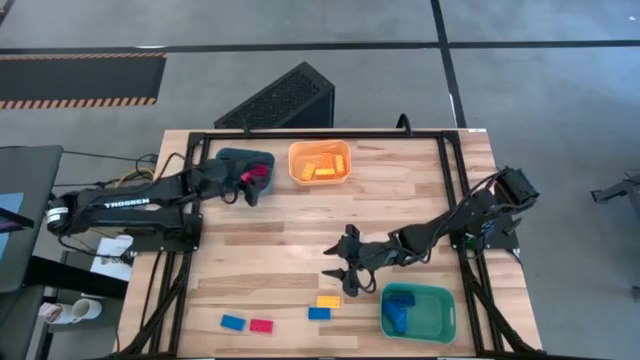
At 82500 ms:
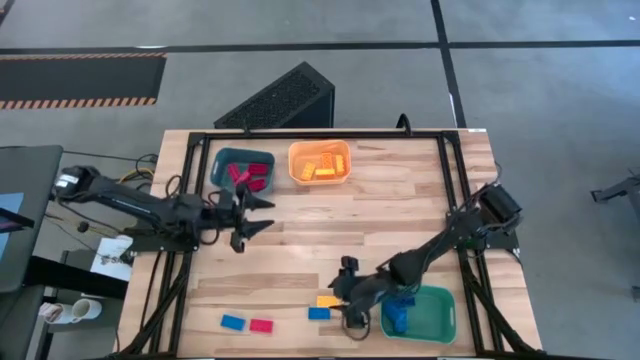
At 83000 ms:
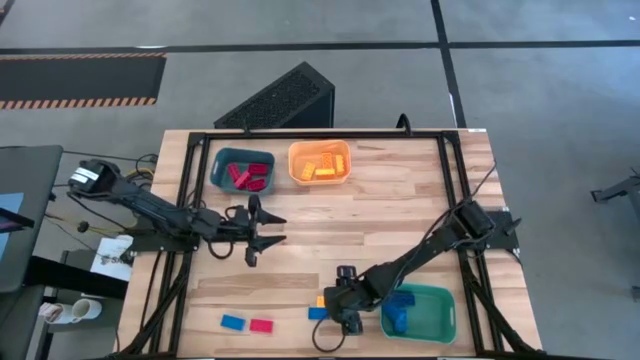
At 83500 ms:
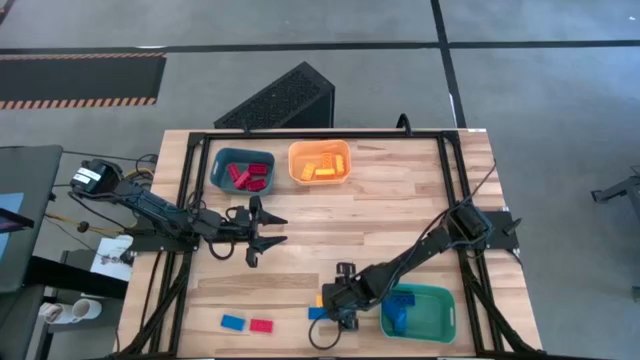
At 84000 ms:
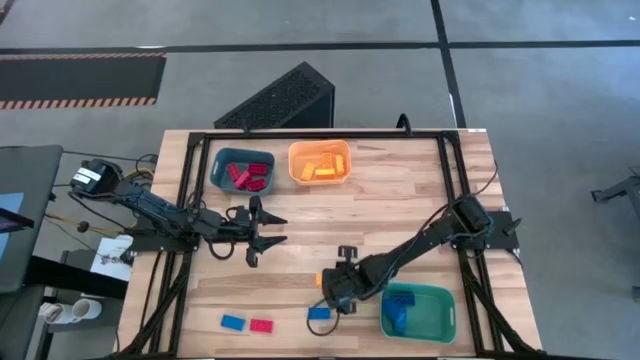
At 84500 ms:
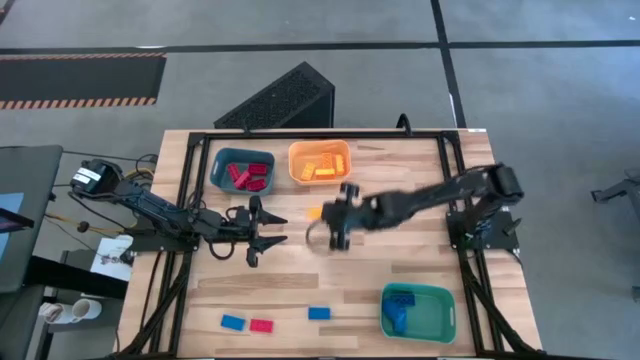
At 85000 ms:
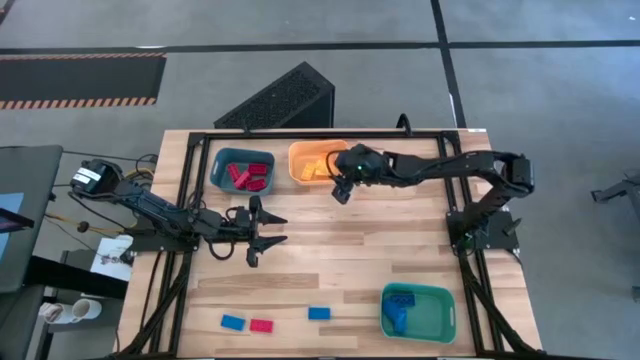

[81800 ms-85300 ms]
Task: Sort & place blocks by color
Put the yellow game piece into the yellow bin

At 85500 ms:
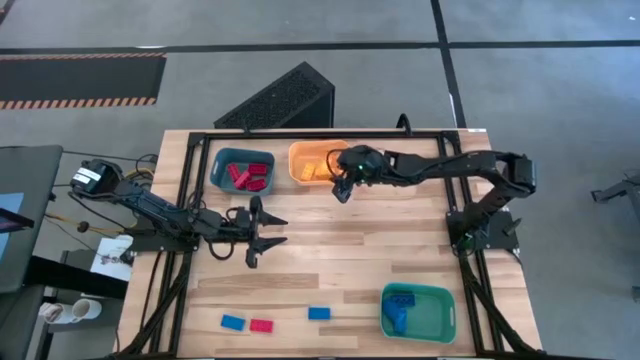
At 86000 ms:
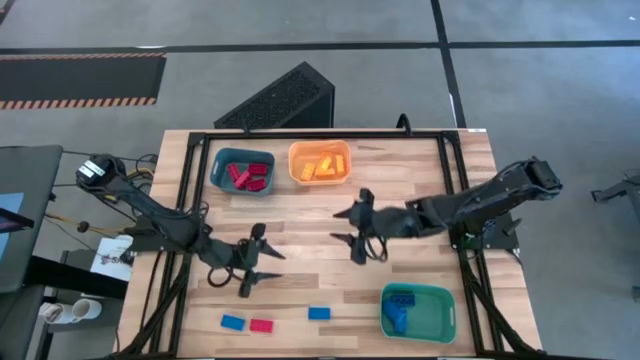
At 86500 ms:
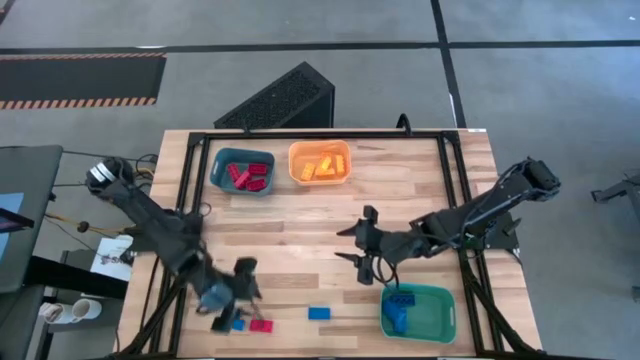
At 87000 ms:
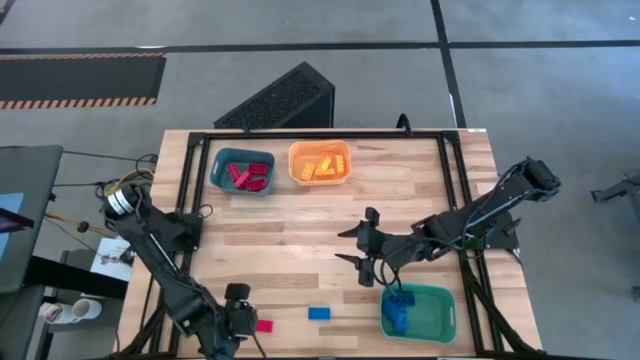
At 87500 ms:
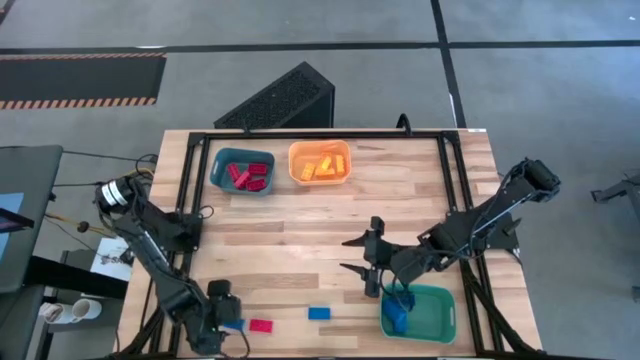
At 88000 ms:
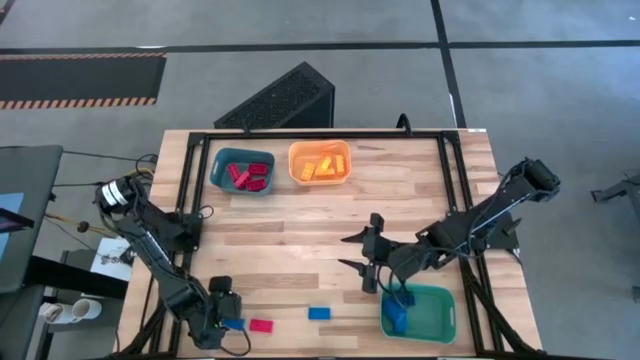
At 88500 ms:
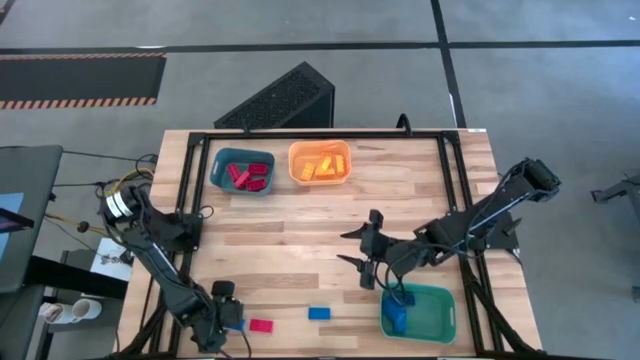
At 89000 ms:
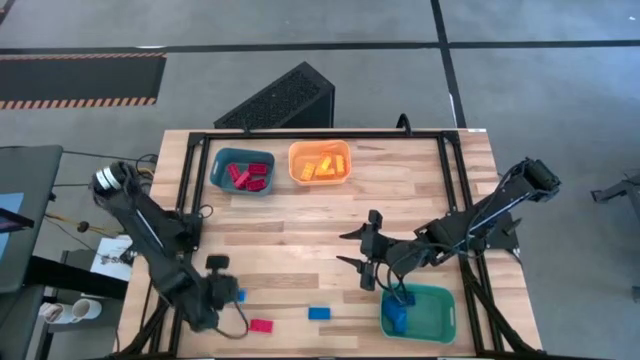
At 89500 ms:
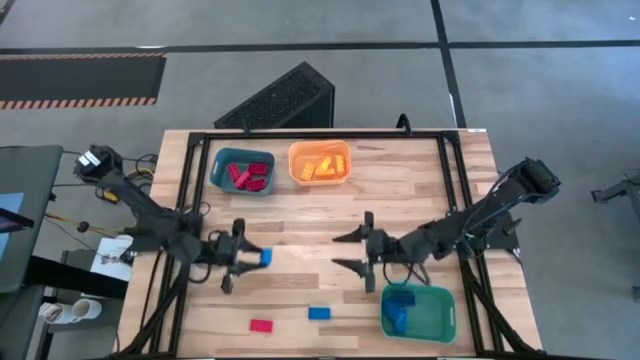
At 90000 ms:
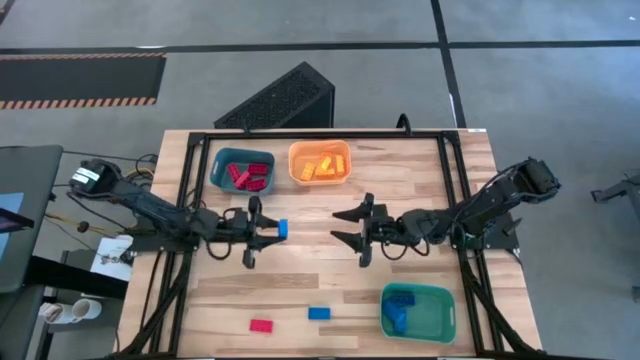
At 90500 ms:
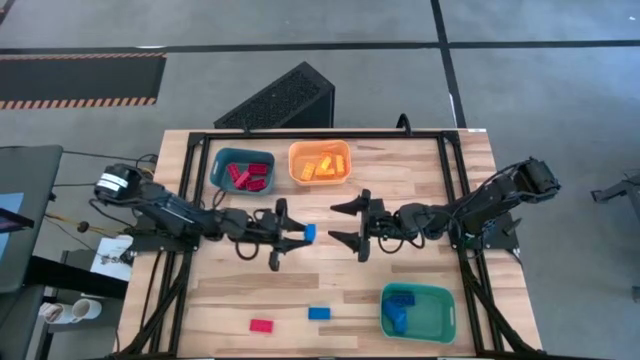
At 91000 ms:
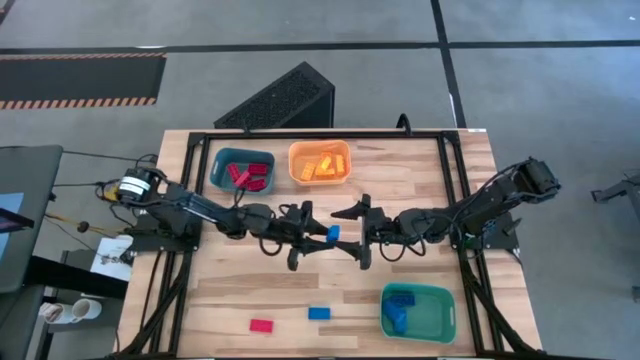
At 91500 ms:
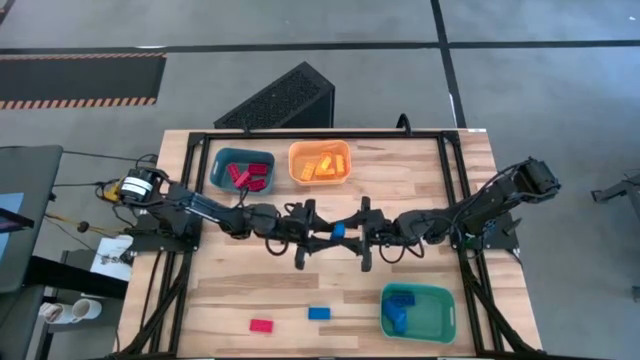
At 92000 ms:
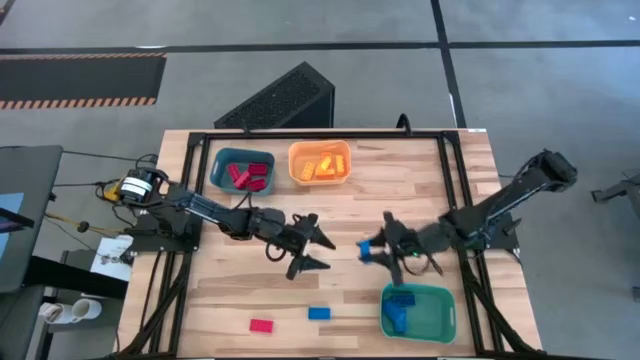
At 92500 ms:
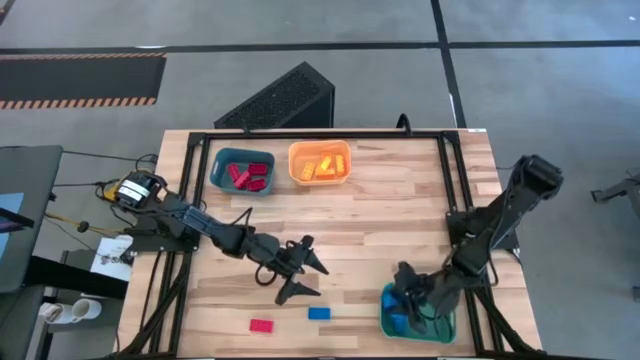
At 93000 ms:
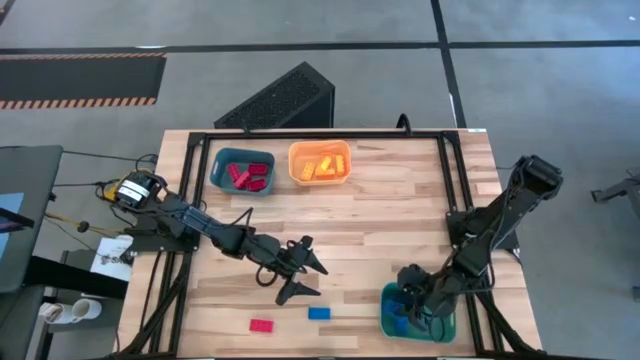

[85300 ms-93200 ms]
Put the blue game piece into the green bin

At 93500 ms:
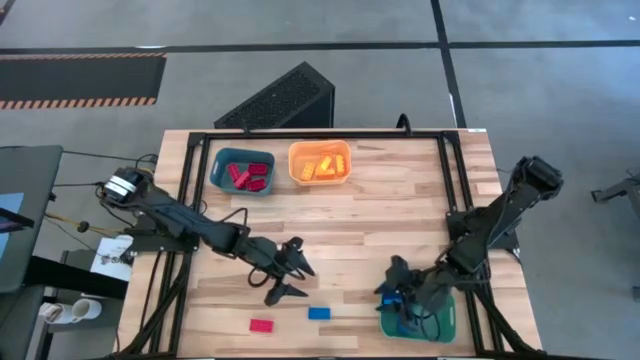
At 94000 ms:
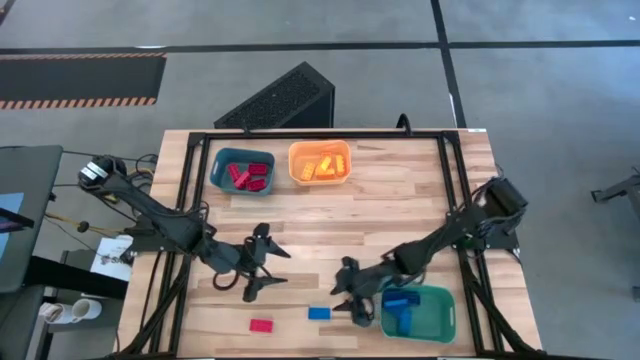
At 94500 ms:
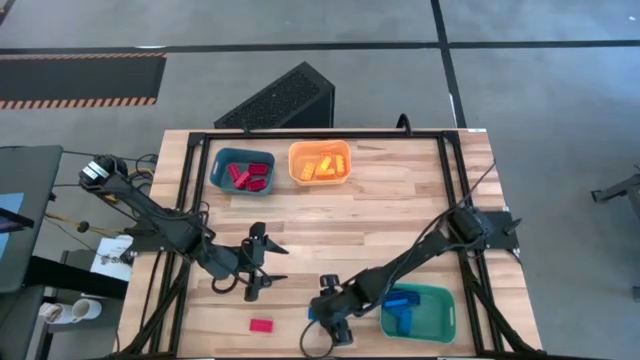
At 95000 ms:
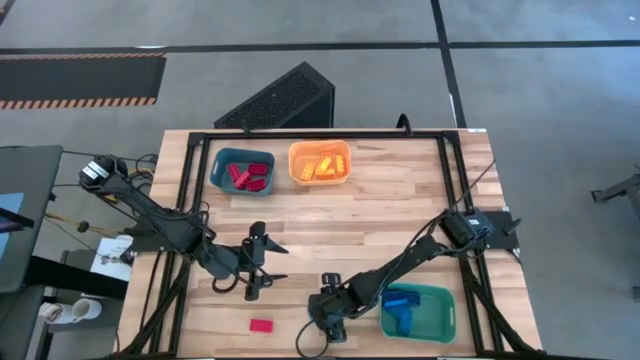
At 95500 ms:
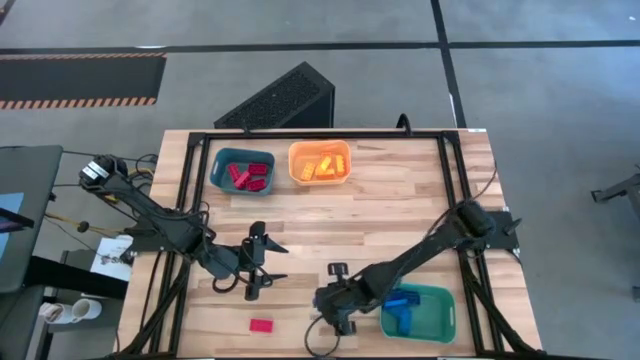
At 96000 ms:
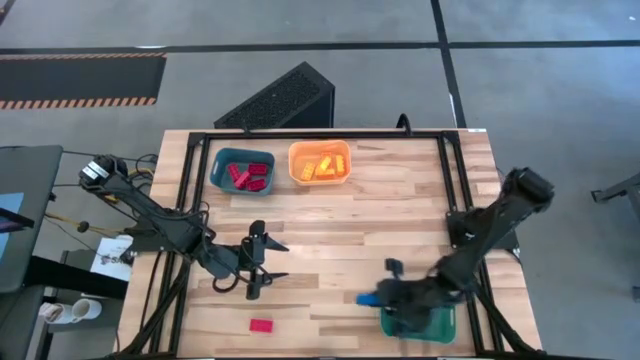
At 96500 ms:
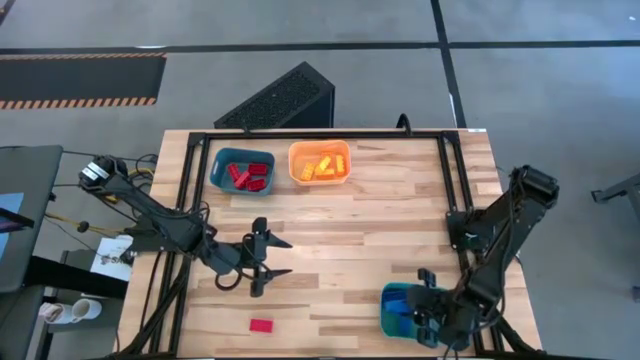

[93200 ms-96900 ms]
Put the blue game piece into the green bin

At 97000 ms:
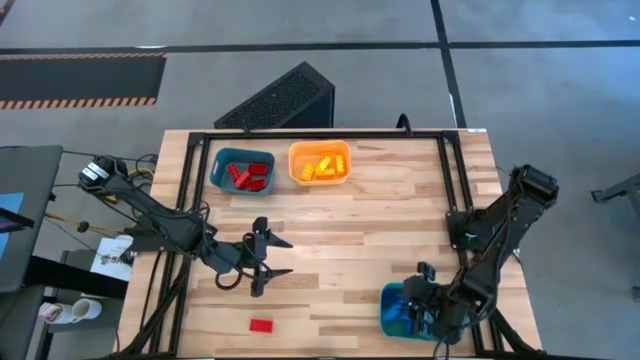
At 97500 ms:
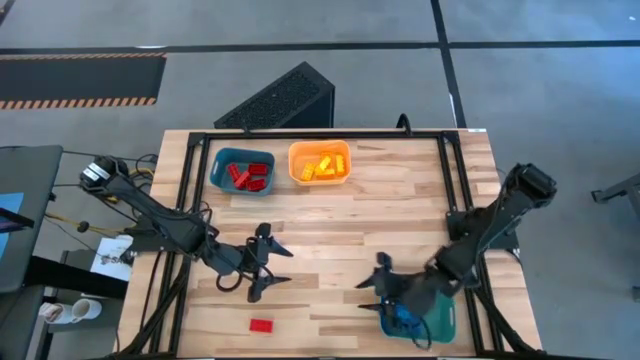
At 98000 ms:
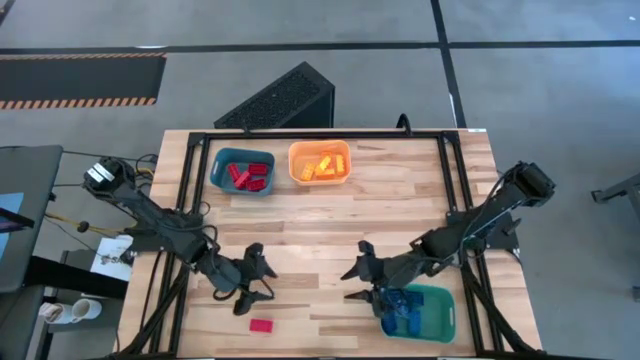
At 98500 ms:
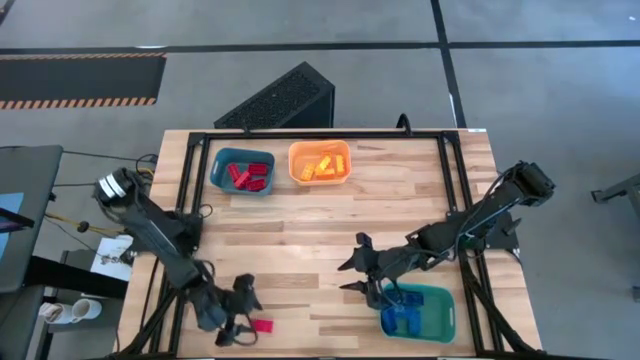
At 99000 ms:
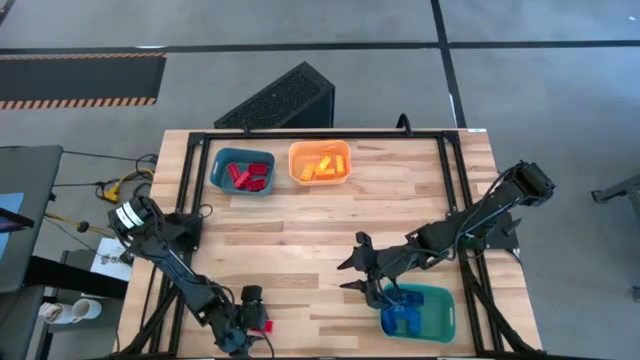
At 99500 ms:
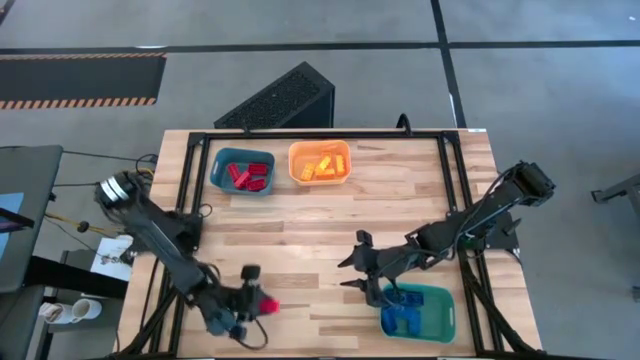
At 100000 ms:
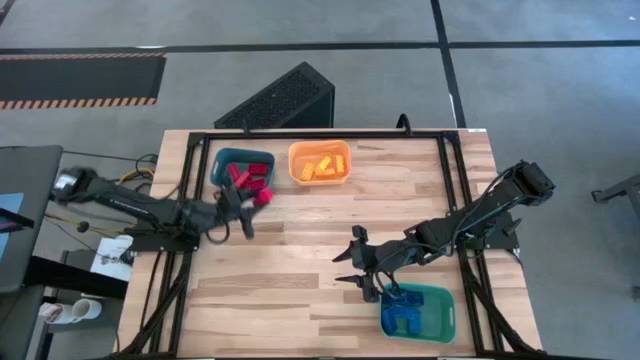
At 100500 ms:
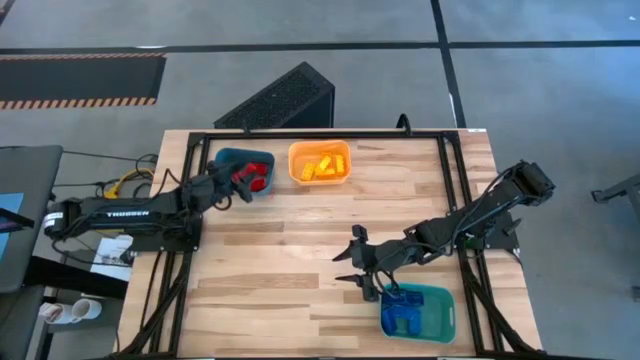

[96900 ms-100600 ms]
Put the red game piece into the blue bin

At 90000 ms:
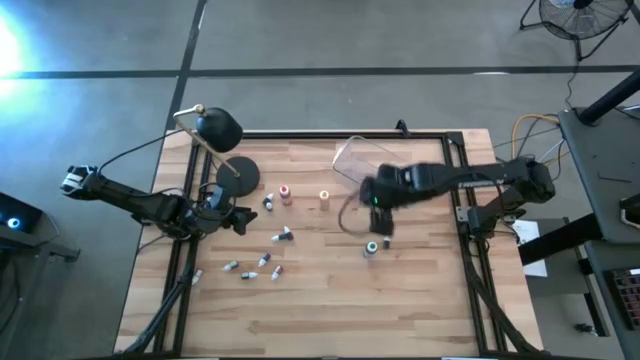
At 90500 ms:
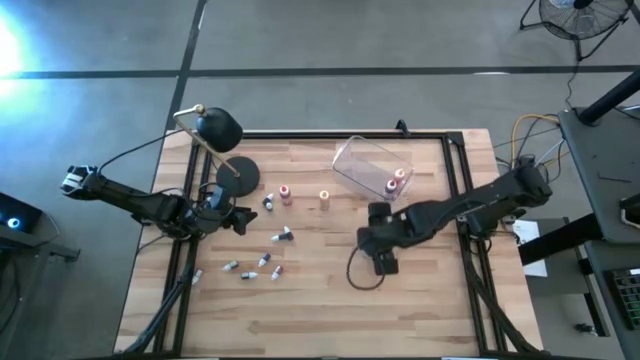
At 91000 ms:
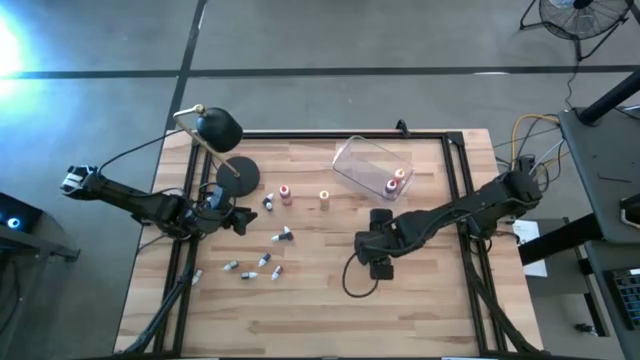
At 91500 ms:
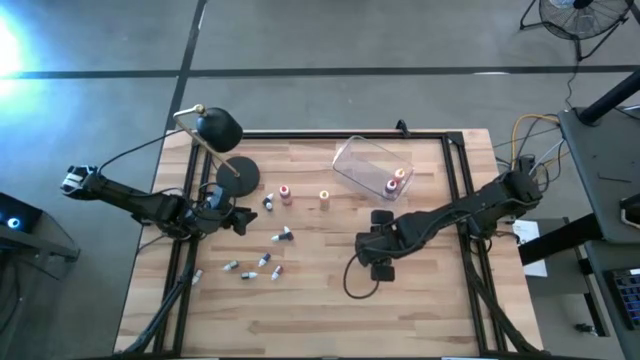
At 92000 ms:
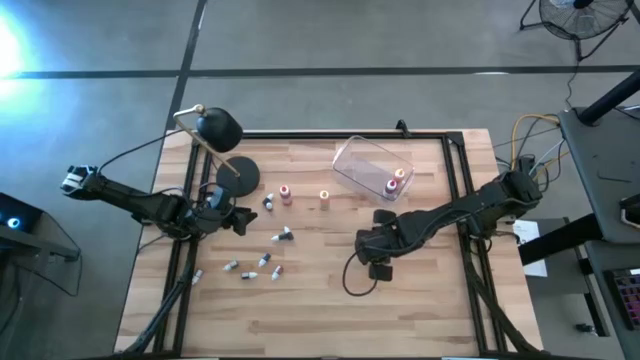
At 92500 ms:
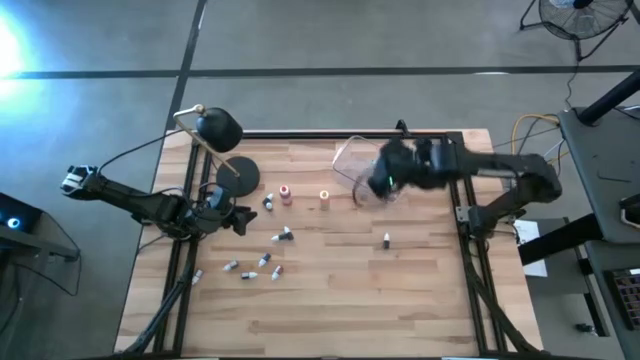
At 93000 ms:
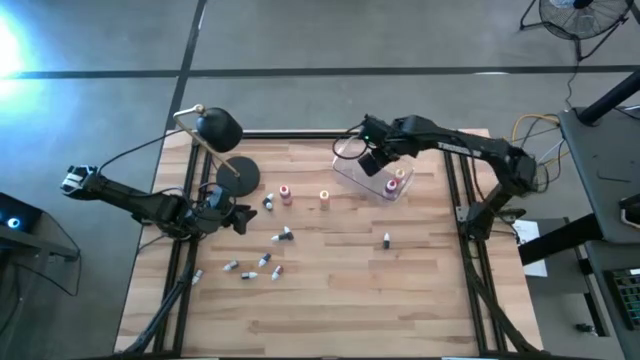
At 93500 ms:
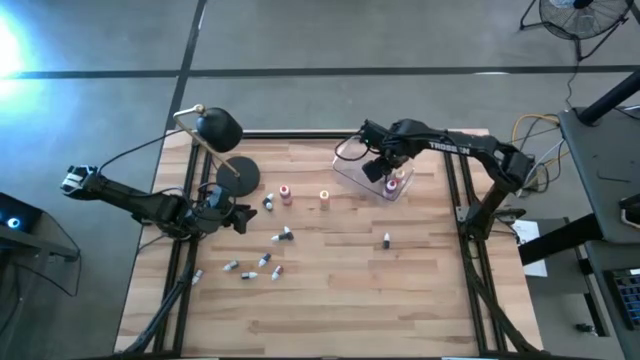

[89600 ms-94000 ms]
Task: Pick & Place food coloring
Put the large green food coloring bottle into the transparent bin
